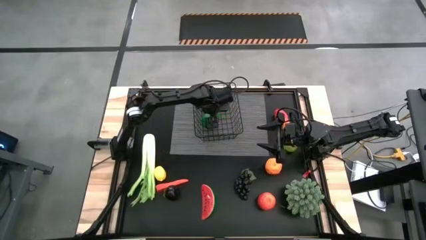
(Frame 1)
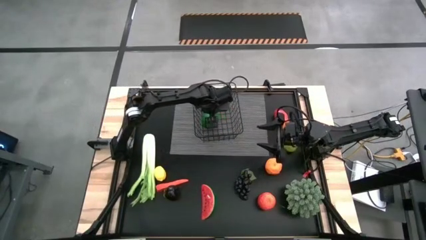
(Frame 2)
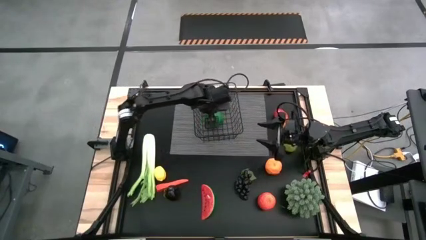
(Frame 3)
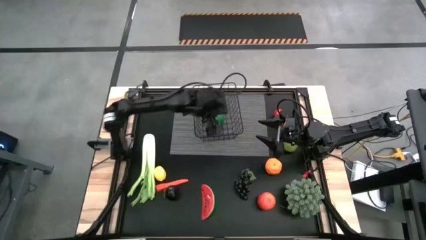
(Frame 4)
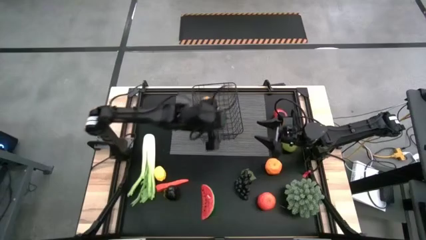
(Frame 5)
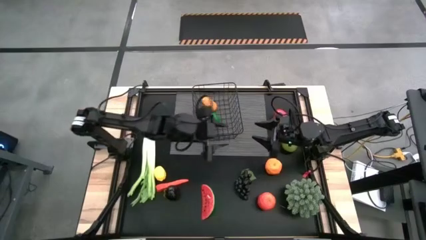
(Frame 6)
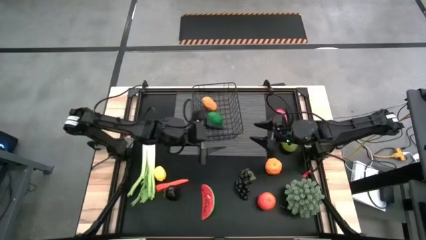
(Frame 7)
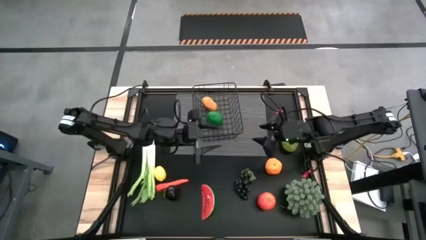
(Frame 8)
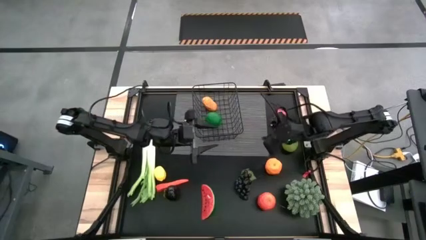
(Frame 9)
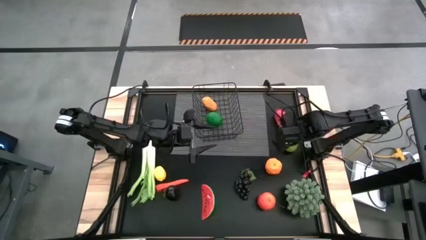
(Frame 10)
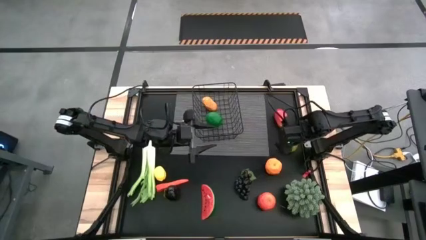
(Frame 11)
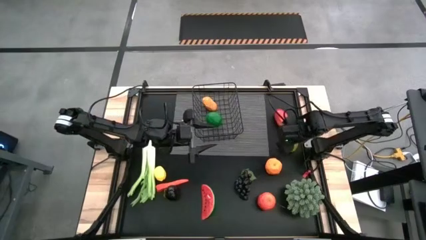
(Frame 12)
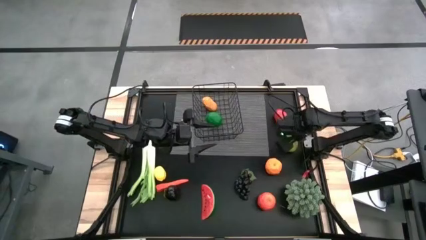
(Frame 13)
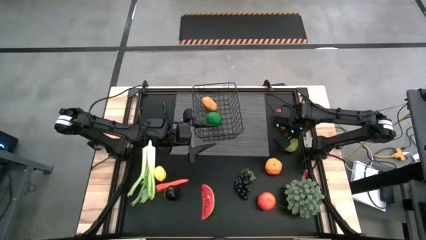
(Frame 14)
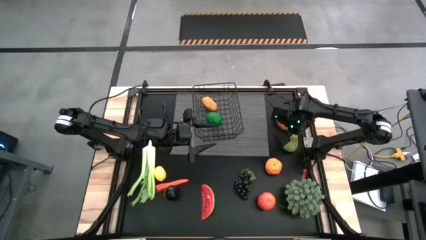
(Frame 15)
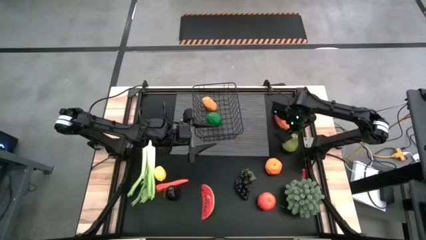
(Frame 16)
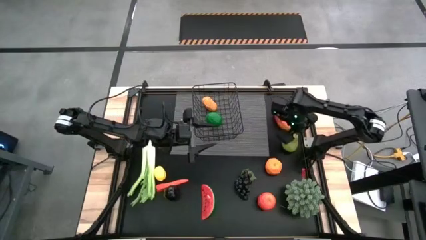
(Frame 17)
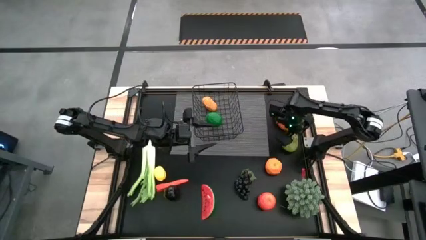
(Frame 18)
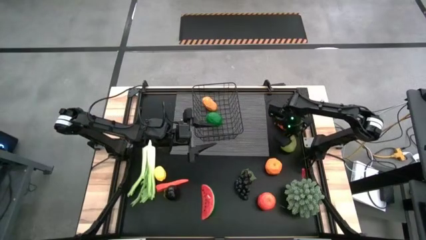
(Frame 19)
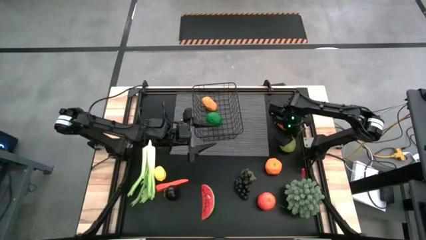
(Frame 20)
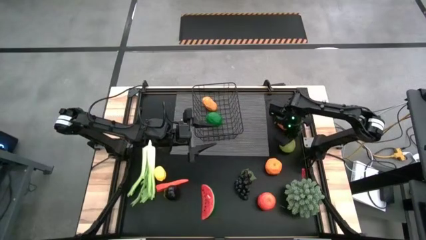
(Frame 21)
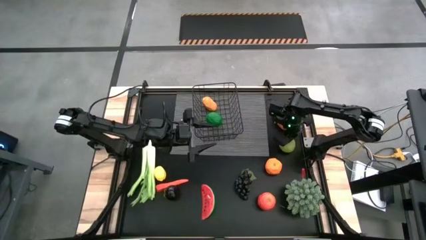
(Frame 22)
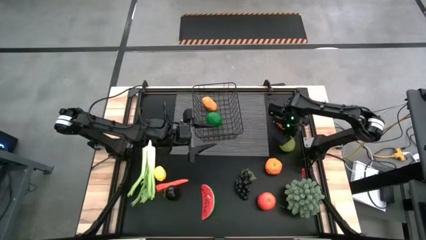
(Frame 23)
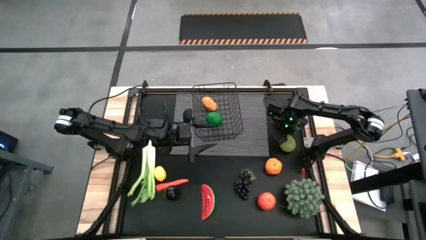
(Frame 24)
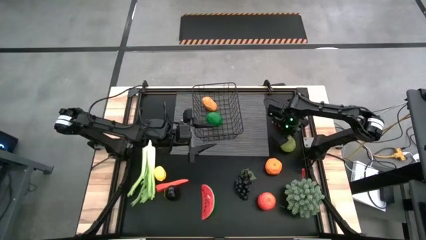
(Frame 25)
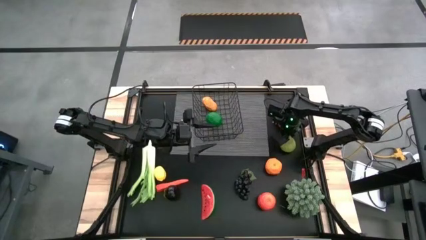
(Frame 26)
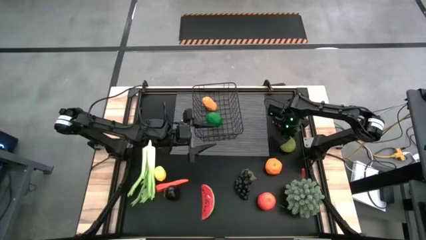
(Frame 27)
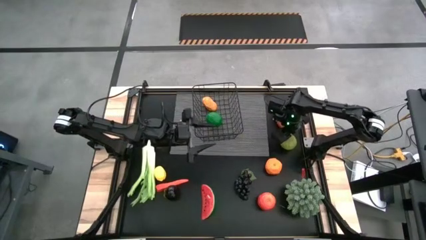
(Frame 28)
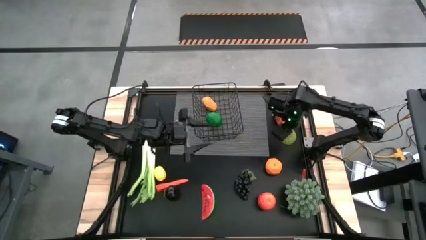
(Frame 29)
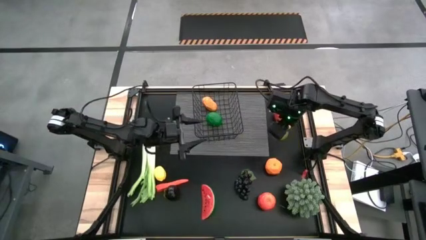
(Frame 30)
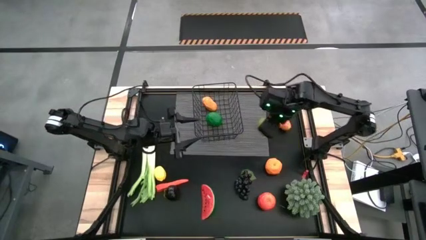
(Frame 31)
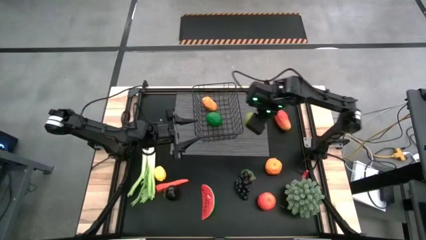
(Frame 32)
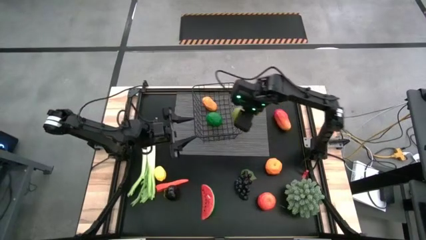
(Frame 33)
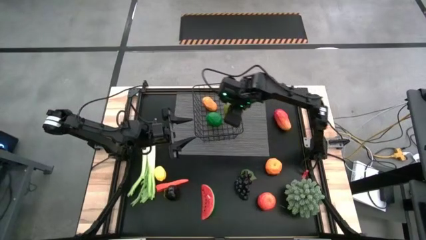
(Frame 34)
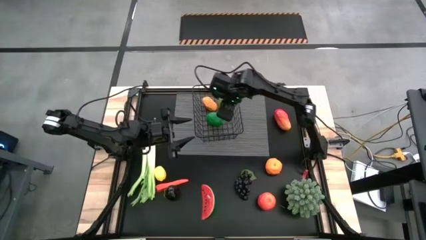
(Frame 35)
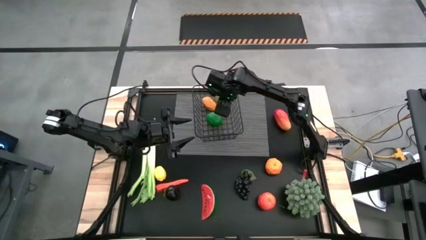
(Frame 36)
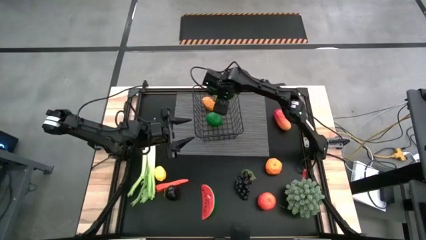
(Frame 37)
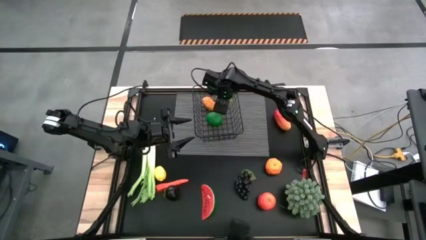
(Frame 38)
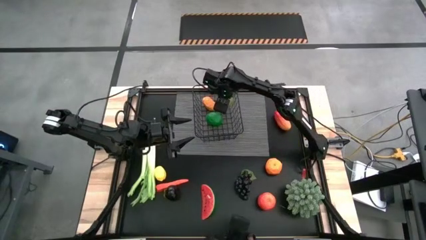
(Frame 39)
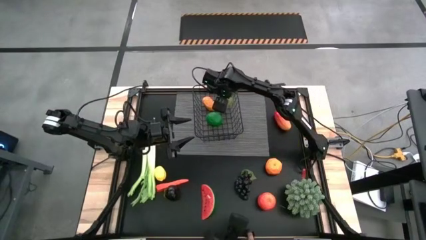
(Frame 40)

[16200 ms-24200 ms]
Task: Build produce basket
Put the pear into the wire basket

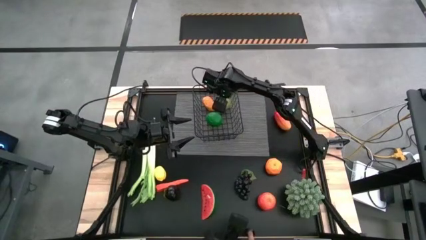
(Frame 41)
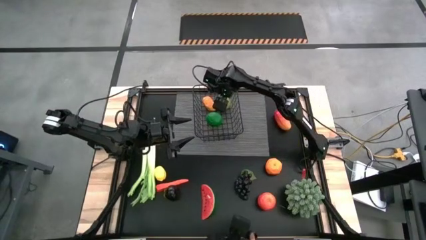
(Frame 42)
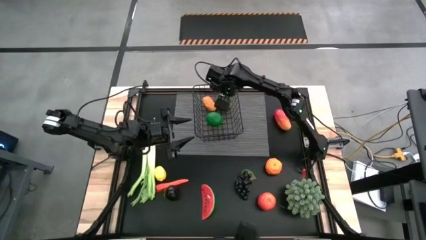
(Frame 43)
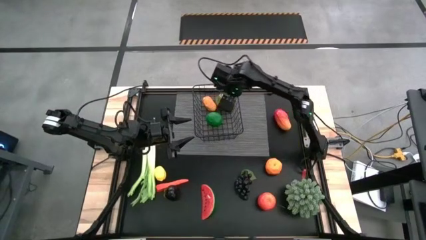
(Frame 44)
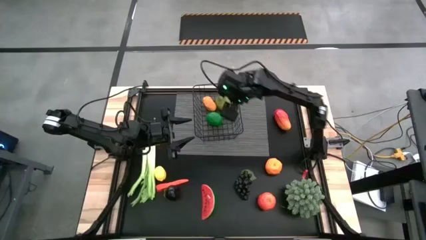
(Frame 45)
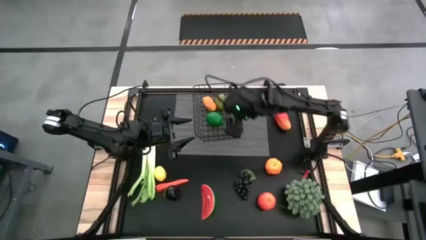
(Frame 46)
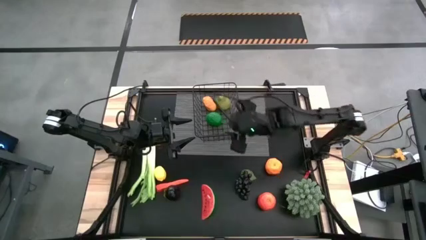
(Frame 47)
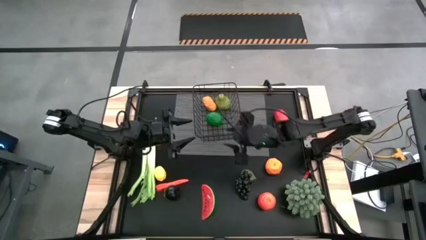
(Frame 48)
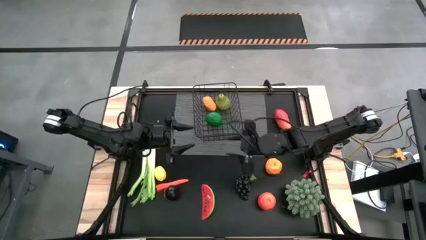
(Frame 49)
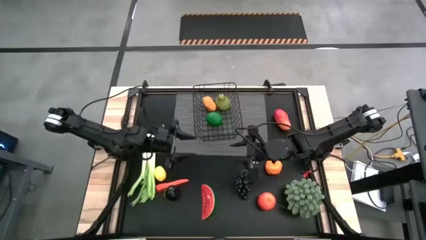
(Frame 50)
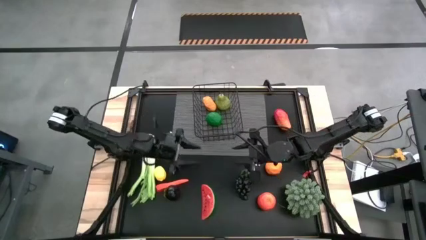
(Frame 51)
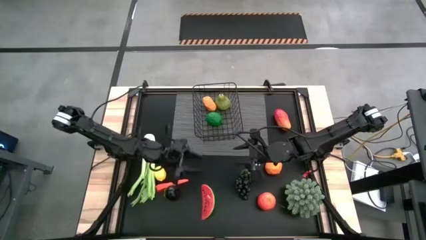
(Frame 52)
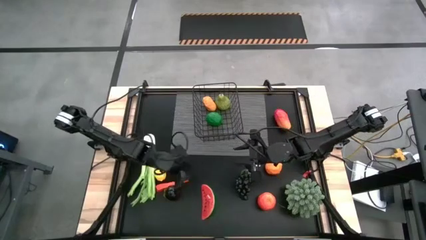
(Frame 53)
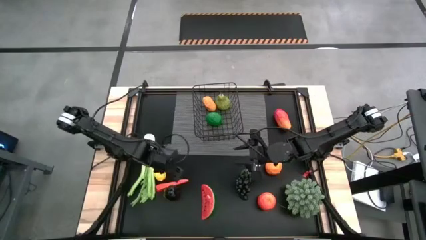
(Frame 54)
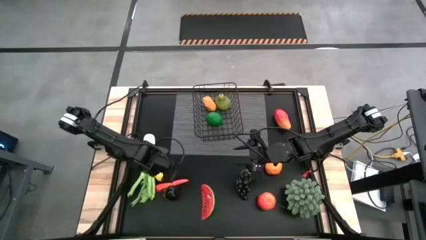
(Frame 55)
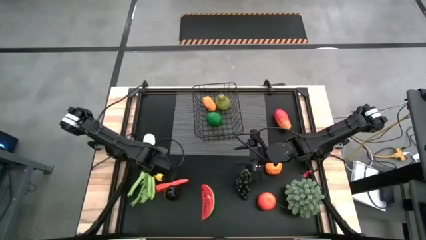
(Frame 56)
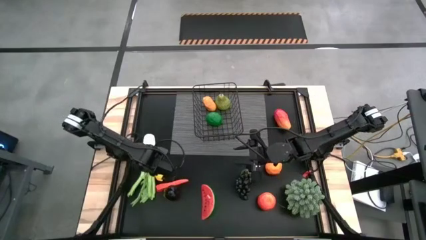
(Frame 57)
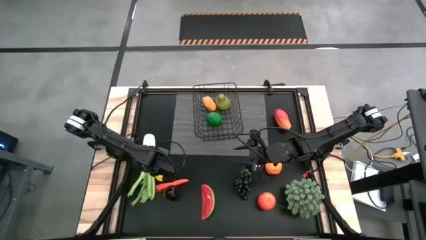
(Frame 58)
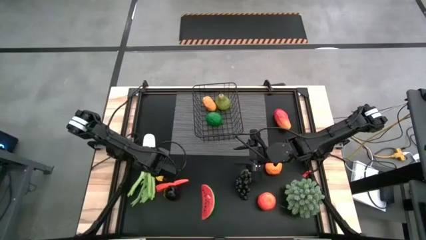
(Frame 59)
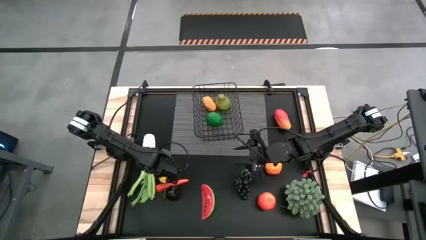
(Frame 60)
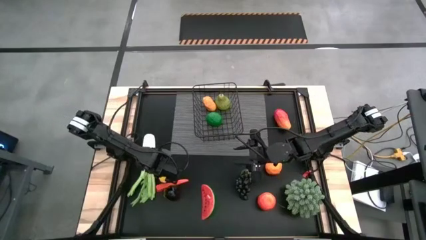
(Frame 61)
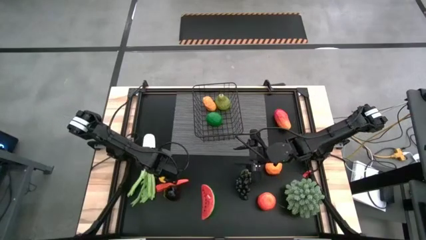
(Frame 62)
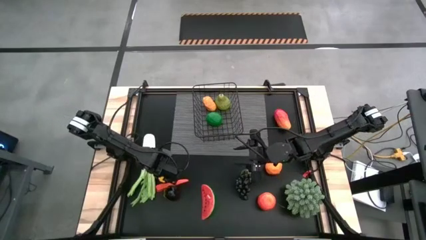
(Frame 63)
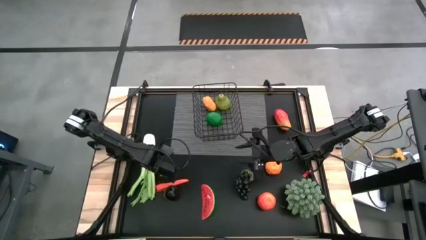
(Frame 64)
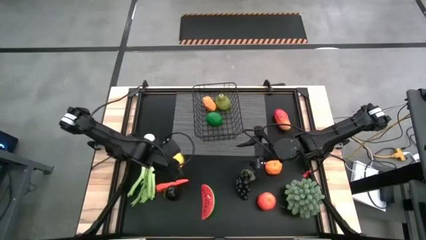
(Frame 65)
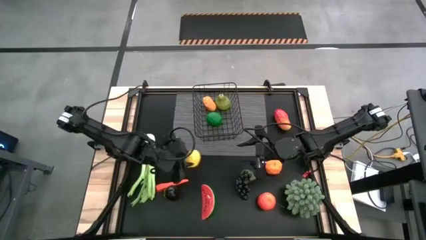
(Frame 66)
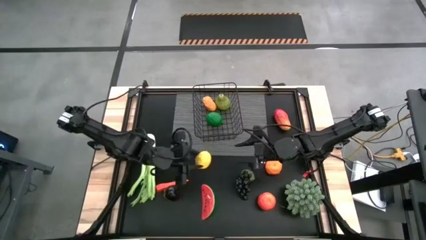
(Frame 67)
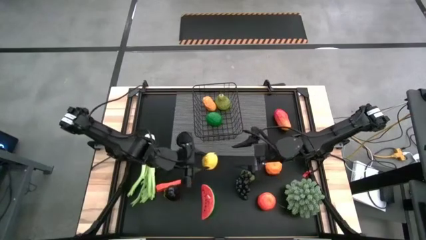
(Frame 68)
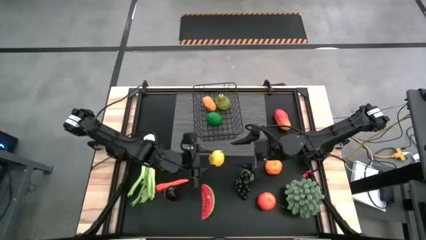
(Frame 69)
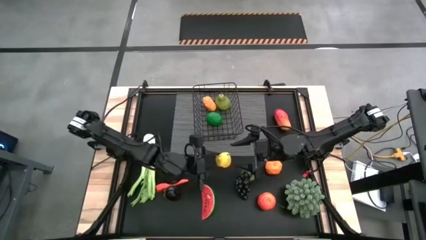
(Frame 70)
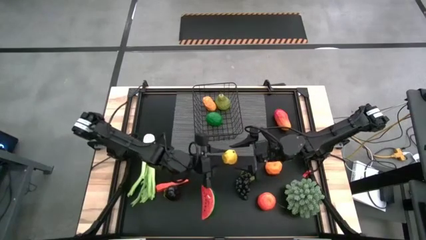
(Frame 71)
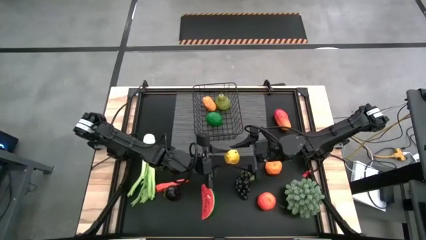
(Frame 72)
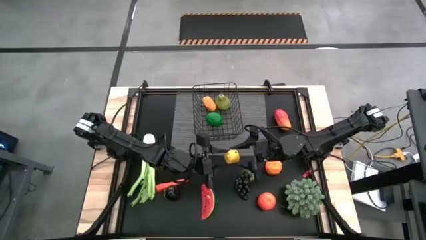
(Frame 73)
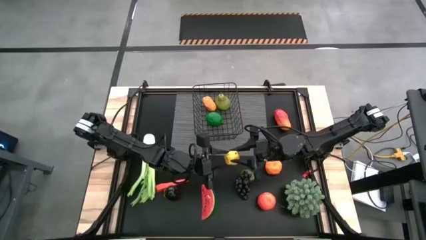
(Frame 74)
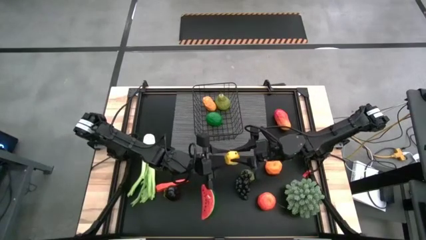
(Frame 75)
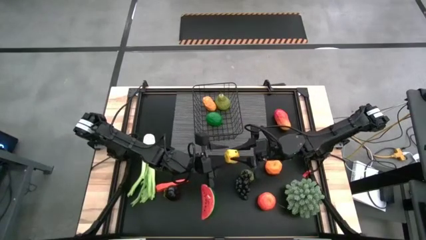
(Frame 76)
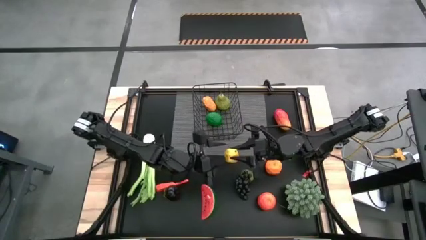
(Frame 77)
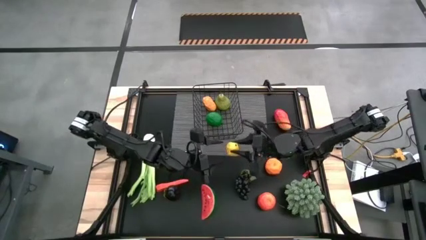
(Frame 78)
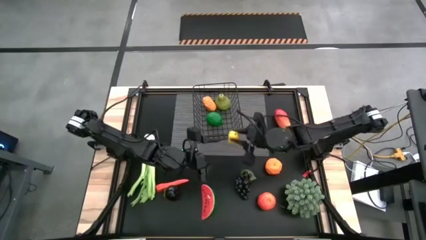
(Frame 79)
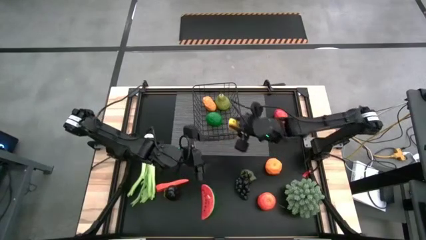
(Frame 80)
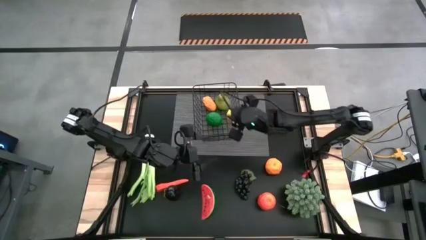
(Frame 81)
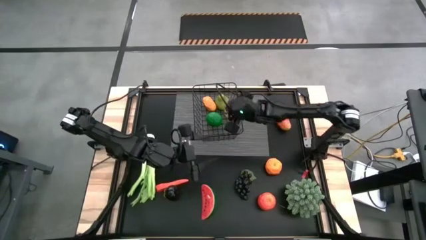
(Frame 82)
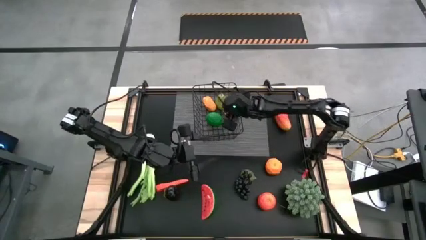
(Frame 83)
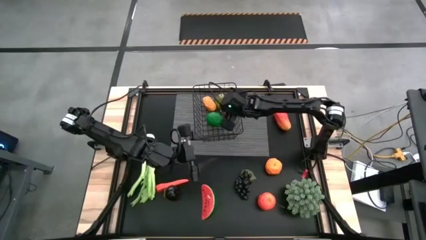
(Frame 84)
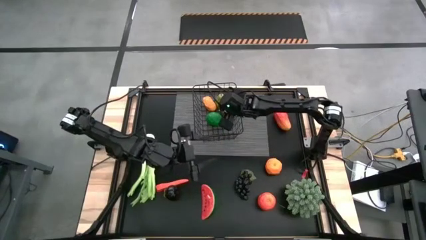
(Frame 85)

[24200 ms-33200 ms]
Put the lemon into the wire basket
